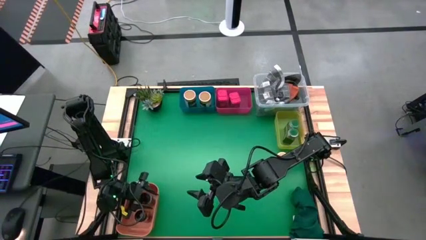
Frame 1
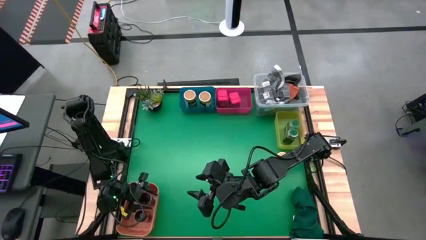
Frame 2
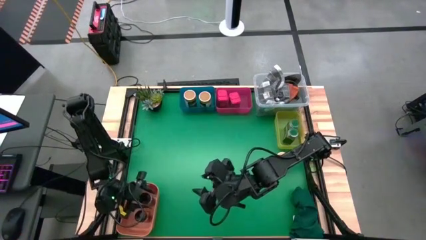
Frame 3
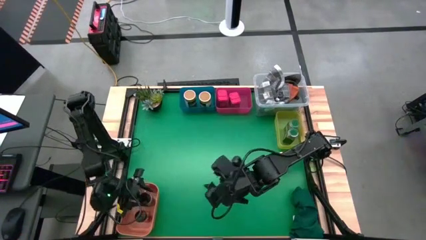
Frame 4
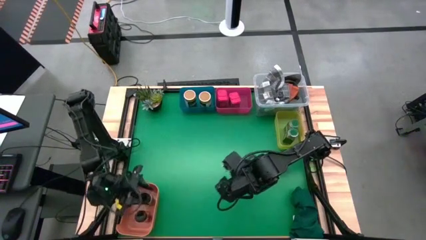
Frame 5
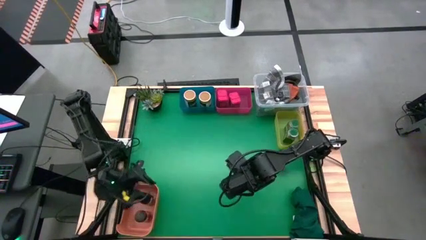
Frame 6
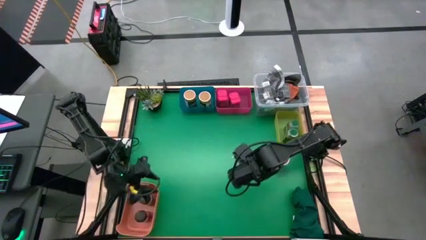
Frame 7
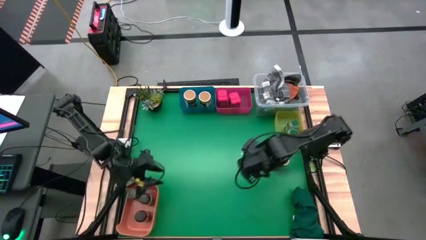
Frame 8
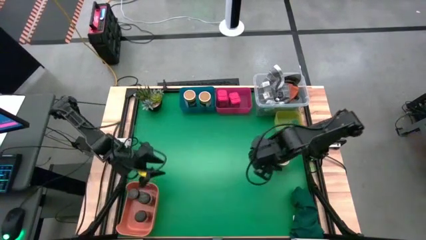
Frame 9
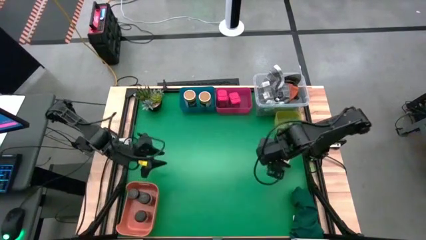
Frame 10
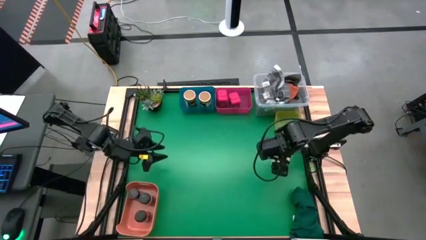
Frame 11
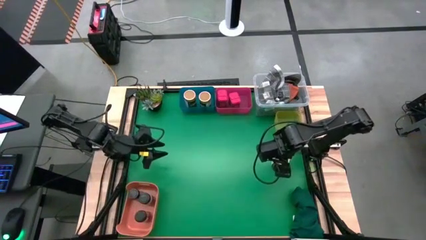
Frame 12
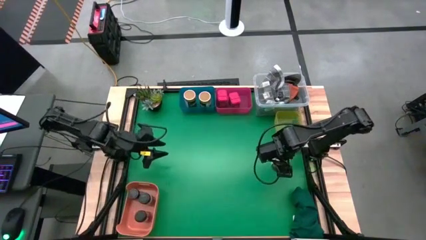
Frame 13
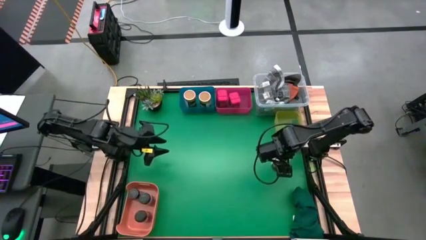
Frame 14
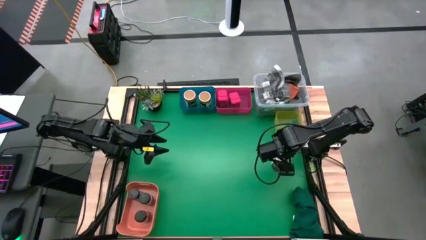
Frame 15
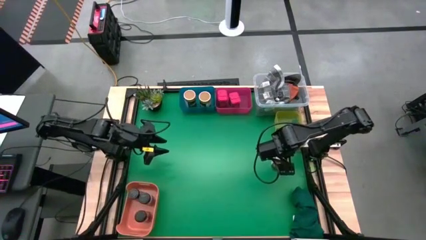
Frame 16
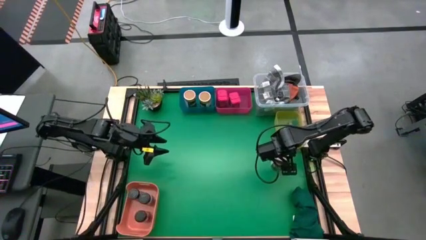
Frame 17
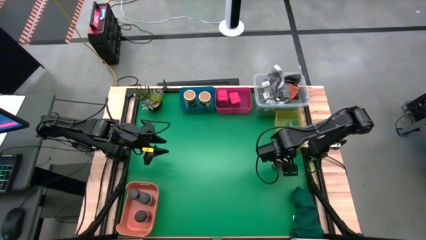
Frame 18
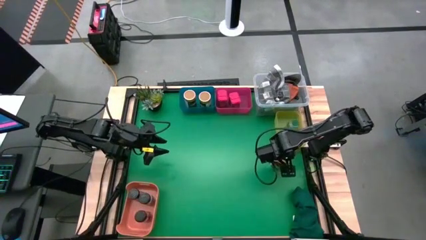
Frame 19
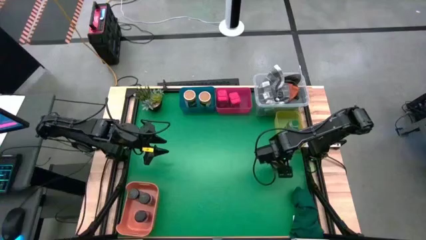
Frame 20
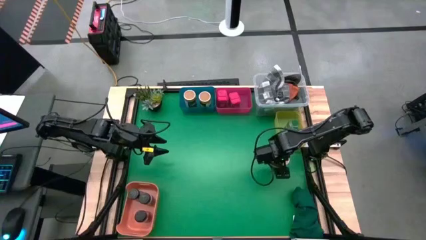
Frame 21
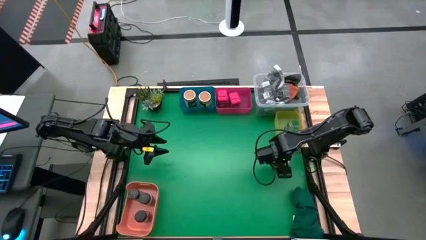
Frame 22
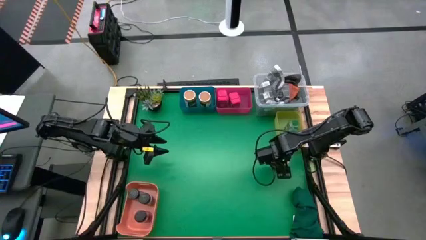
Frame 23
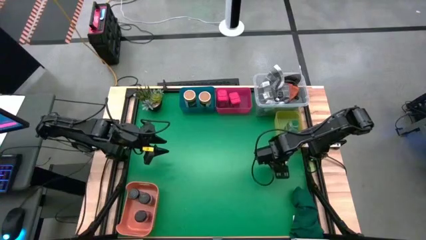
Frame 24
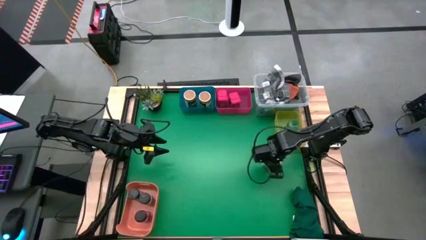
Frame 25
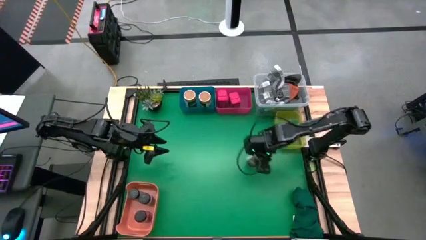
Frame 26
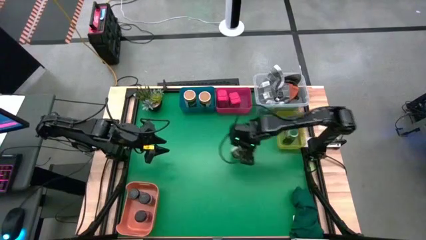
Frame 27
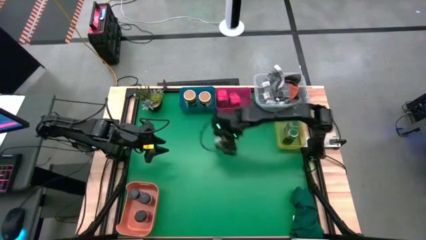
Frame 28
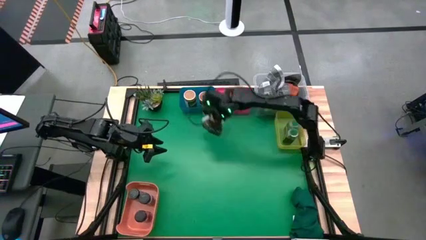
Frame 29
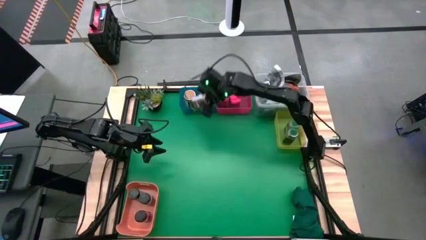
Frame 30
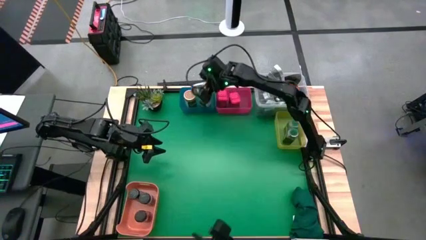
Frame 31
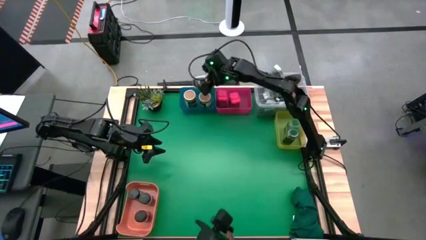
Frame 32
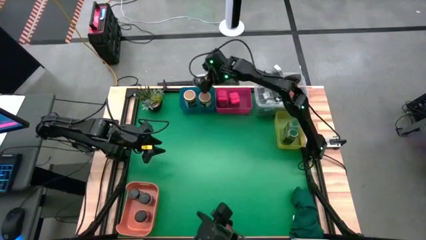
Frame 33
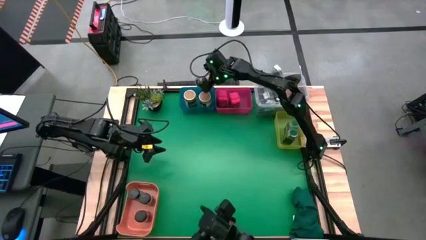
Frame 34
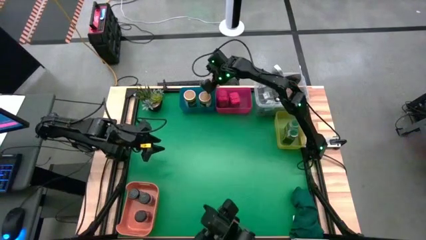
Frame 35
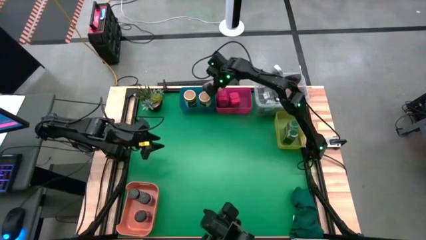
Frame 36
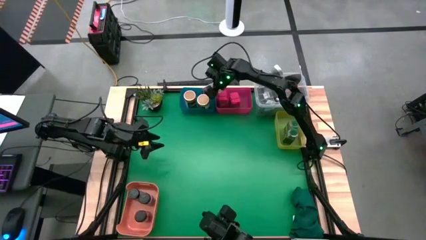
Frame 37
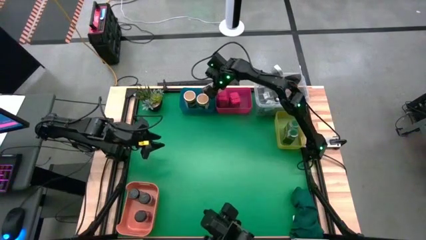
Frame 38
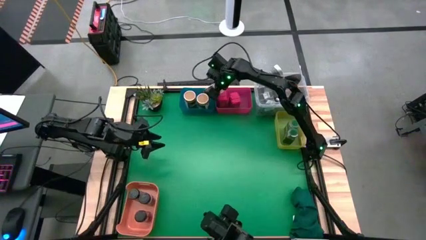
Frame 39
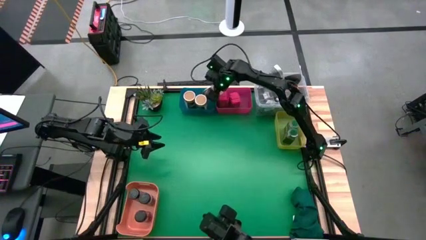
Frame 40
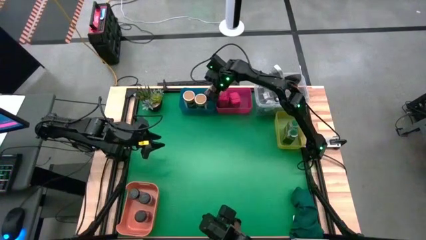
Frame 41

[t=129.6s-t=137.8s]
Task: Sort spices by type
Put the brown spice bottle into the blue bin

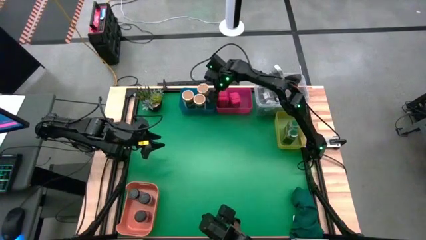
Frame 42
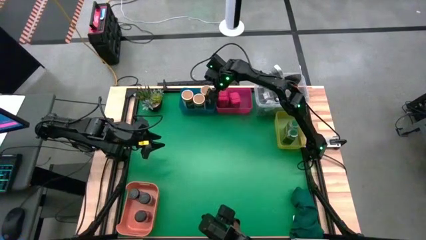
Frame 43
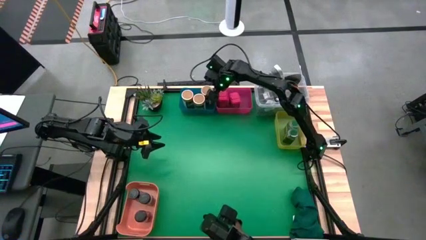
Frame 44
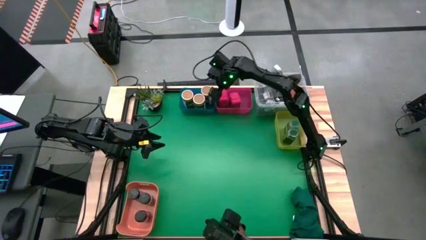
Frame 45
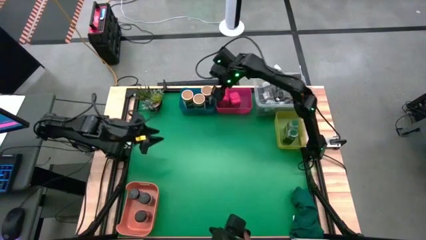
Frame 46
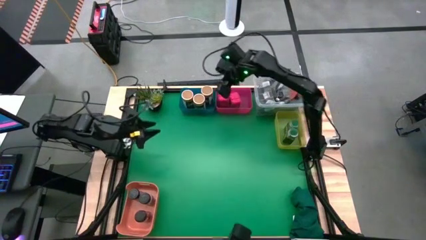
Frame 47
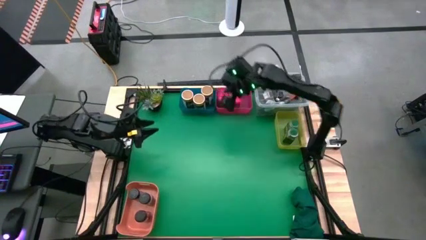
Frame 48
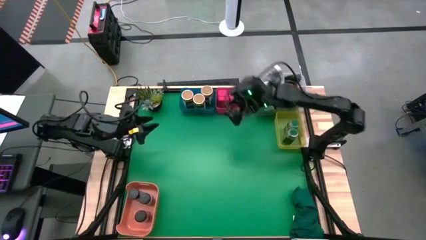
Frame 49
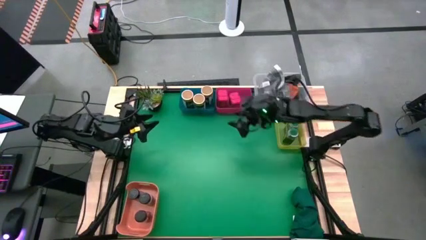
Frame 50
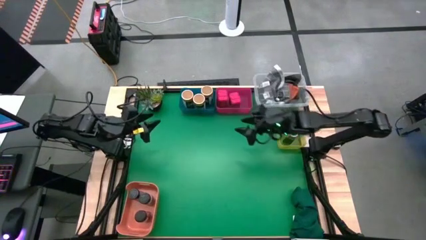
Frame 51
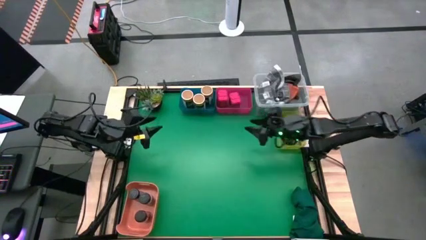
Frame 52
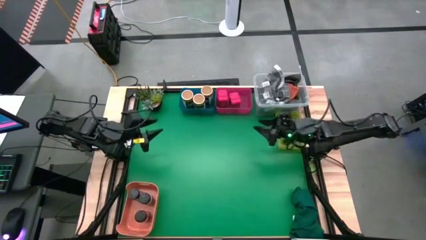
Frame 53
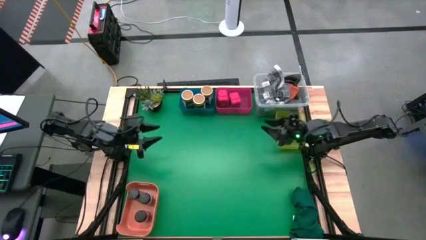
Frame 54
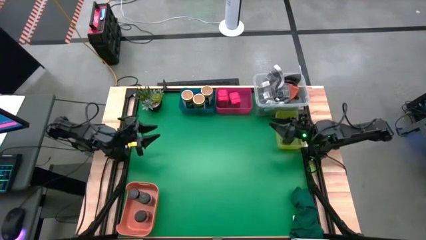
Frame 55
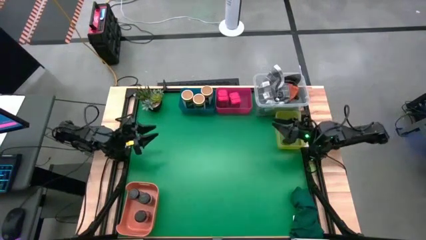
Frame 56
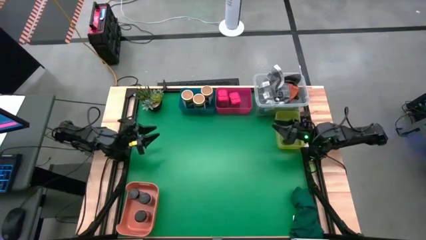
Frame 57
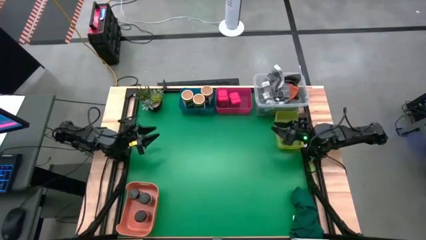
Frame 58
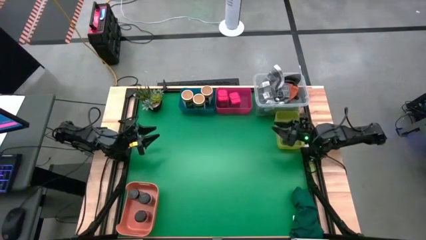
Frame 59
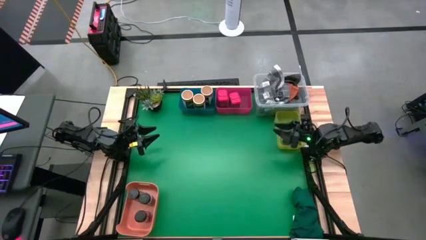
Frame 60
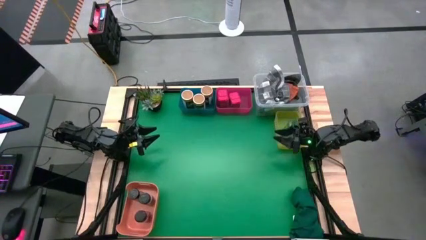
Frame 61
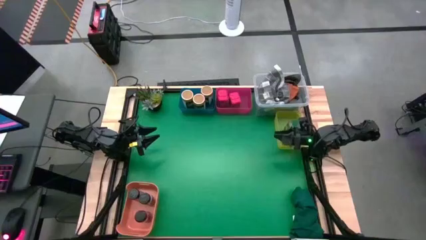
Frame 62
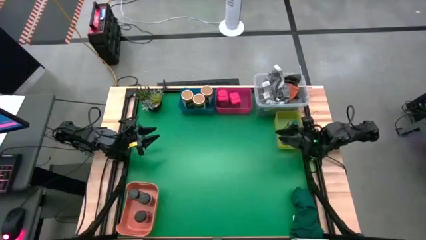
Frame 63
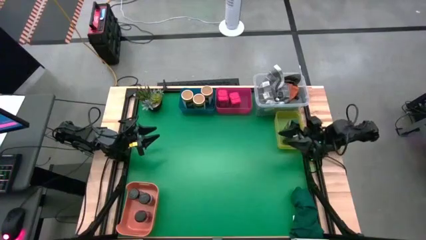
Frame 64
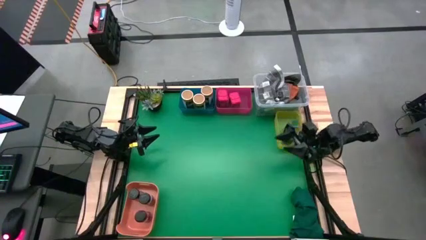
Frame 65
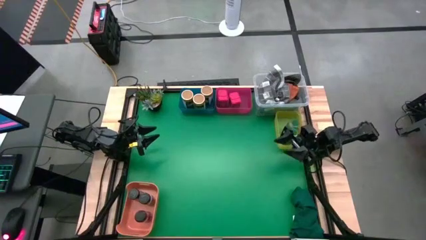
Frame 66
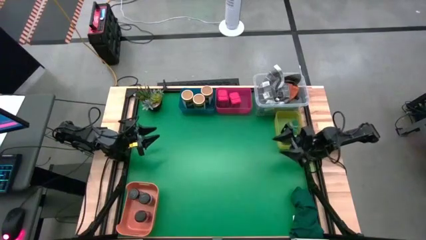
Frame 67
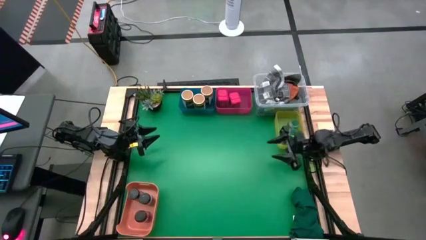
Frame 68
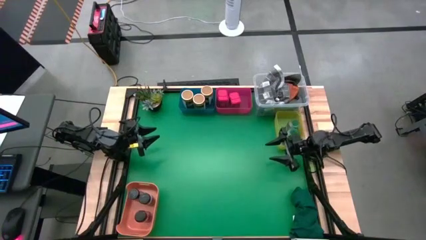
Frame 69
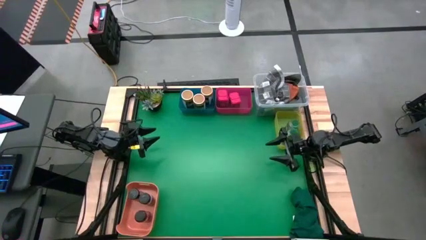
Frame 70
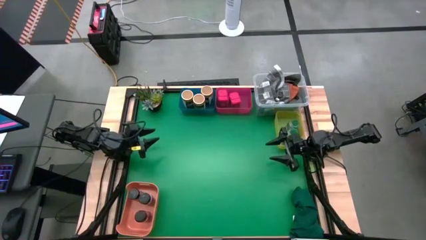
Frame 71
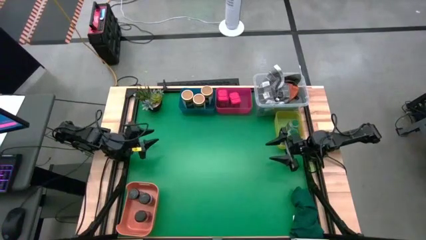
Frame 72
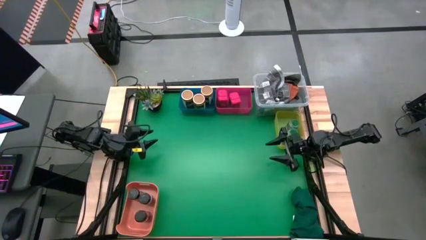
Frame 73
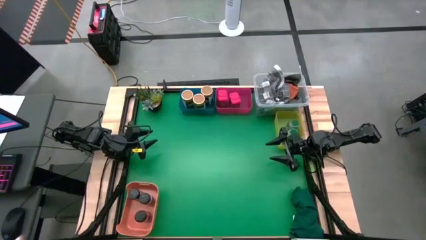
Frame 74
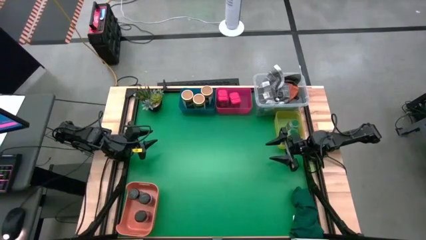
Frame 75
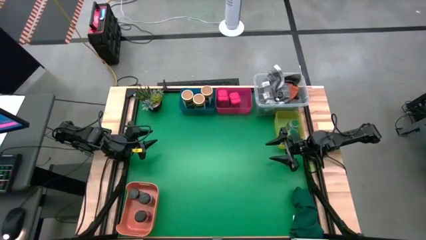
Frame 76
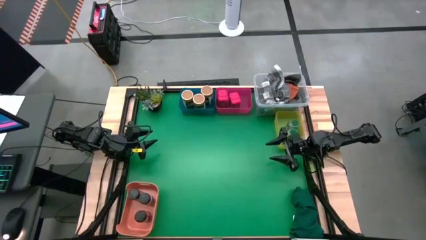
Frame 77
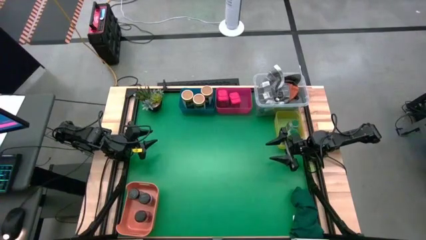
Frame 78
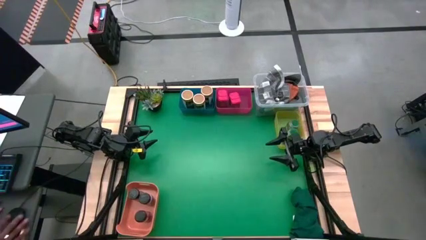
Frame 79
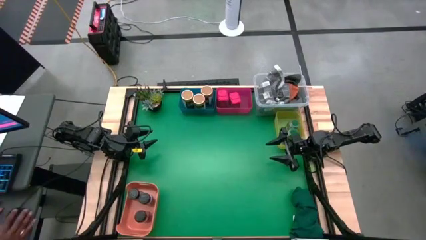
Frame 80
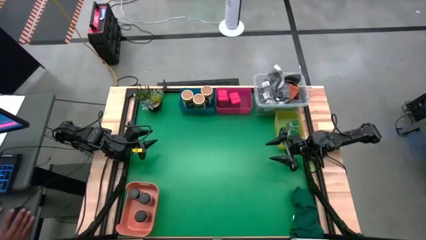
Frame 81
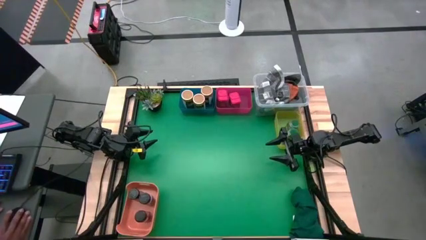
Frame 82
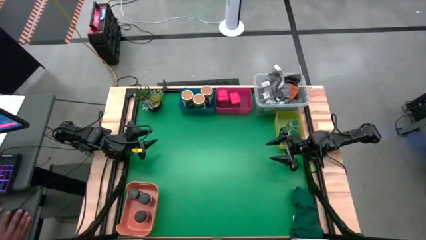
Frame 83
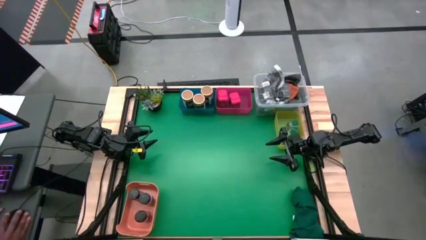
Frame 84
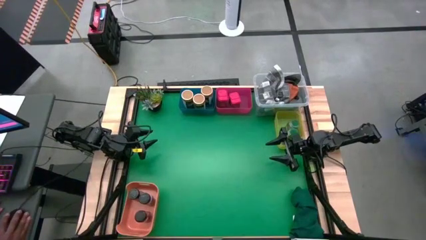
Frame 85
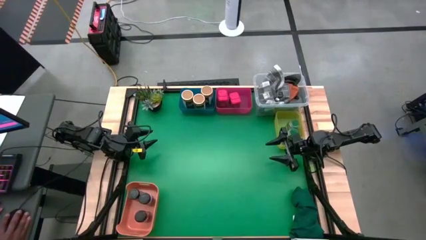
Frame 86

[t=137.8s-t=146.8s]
Return to Home Position
